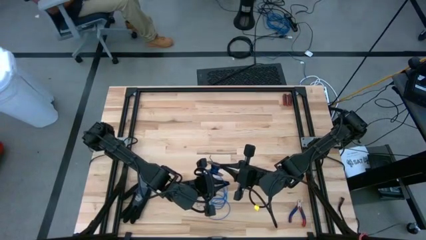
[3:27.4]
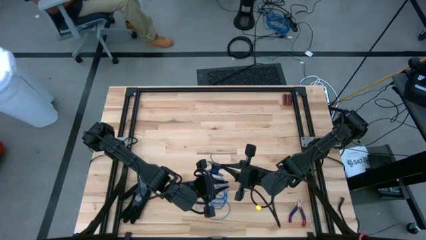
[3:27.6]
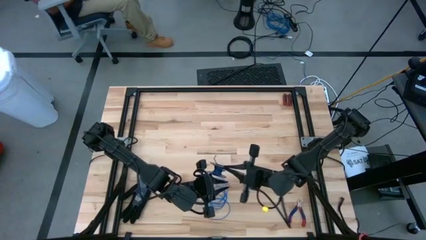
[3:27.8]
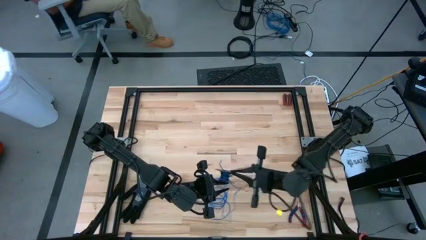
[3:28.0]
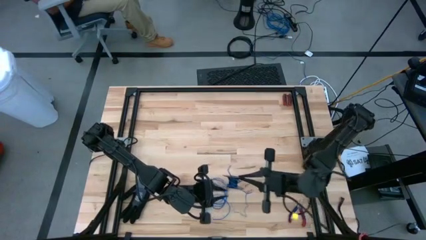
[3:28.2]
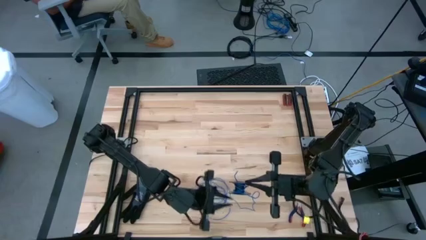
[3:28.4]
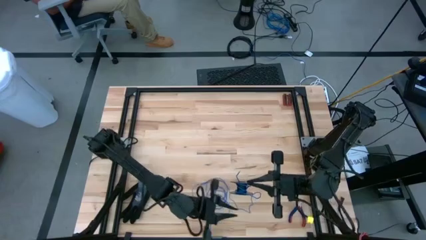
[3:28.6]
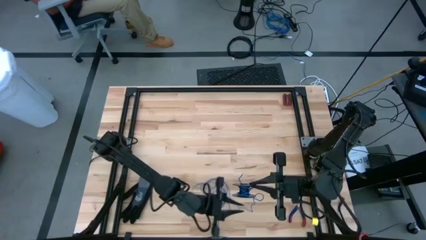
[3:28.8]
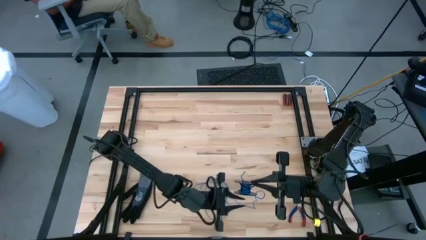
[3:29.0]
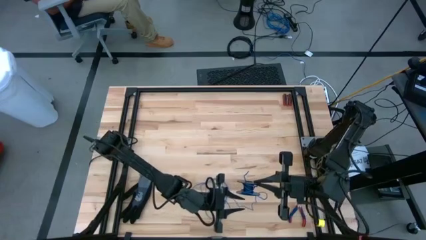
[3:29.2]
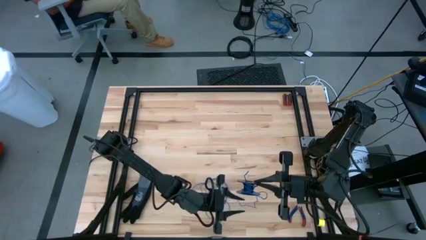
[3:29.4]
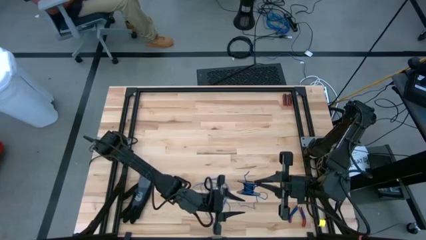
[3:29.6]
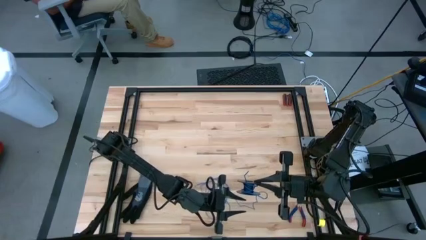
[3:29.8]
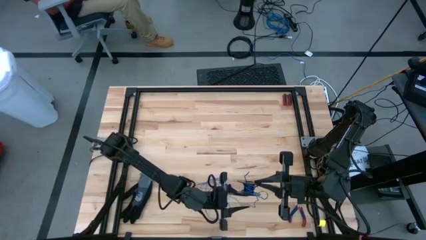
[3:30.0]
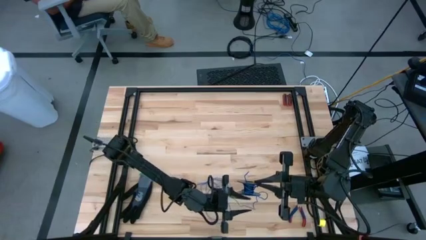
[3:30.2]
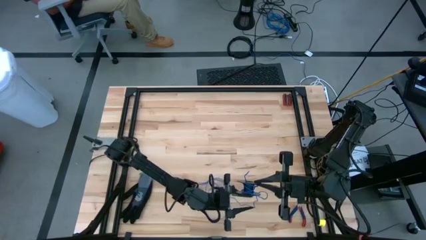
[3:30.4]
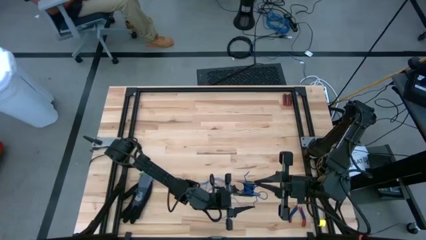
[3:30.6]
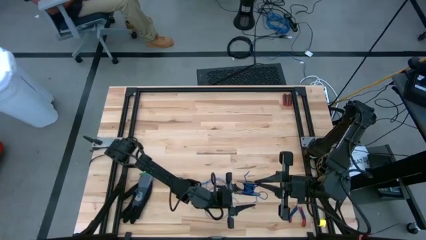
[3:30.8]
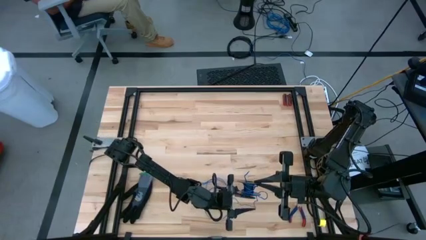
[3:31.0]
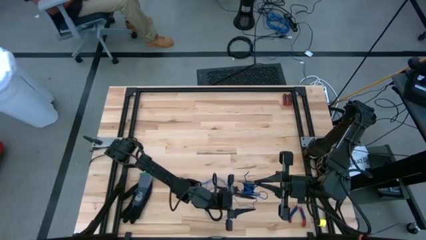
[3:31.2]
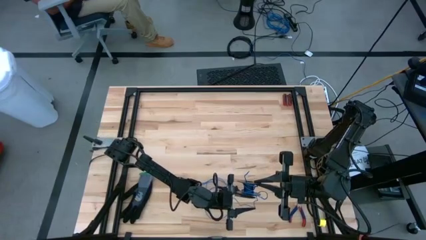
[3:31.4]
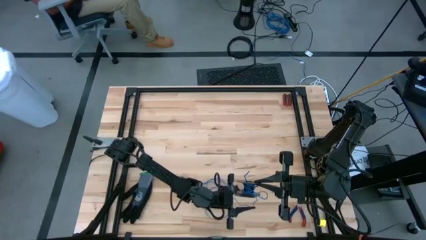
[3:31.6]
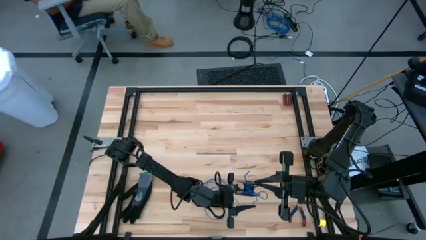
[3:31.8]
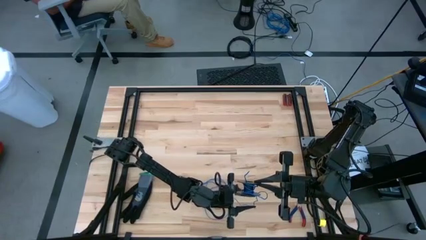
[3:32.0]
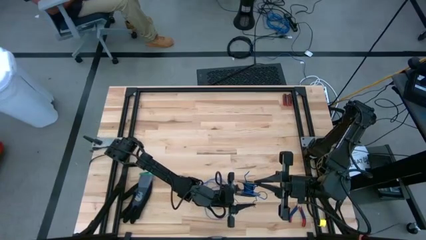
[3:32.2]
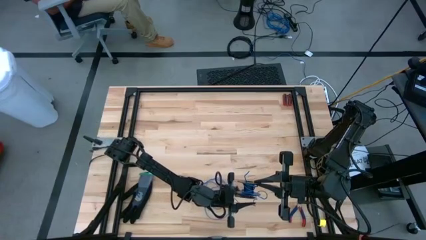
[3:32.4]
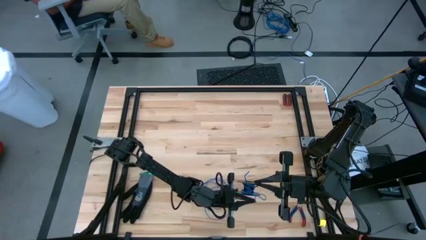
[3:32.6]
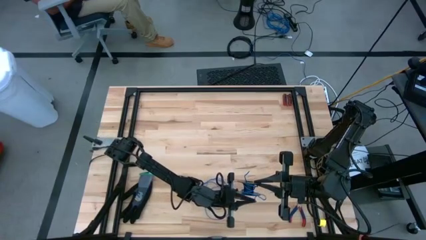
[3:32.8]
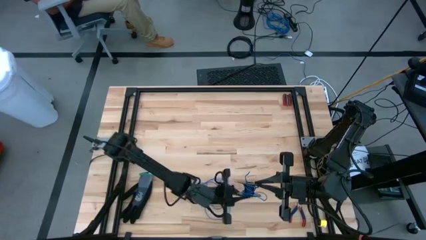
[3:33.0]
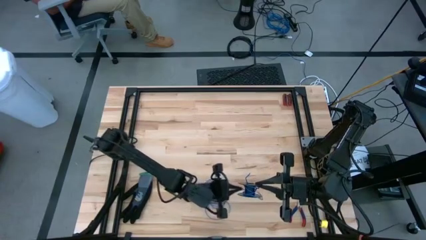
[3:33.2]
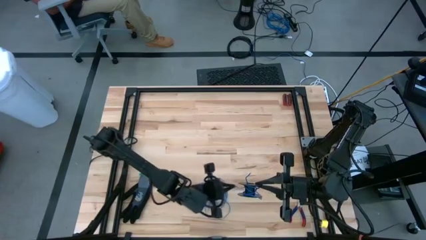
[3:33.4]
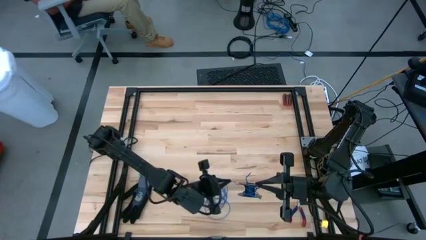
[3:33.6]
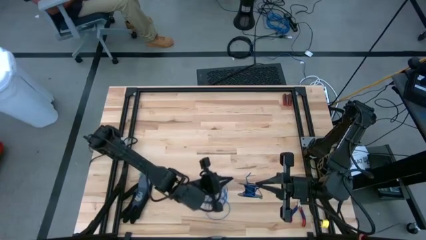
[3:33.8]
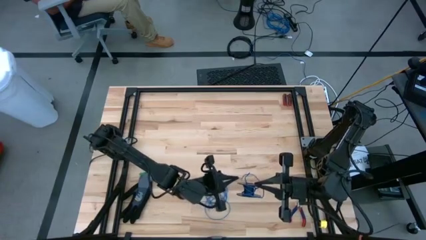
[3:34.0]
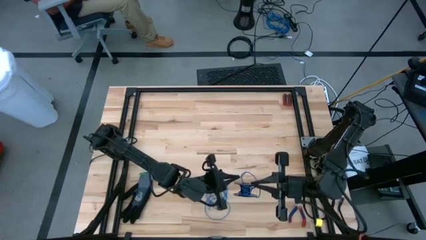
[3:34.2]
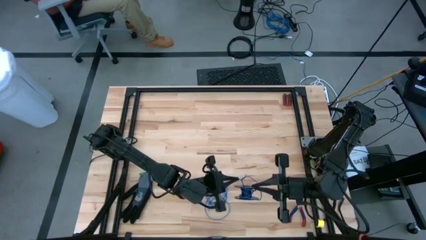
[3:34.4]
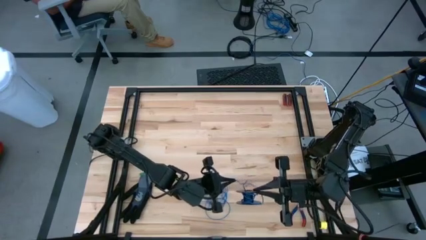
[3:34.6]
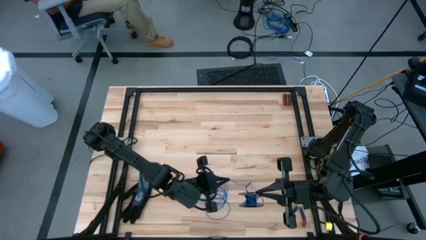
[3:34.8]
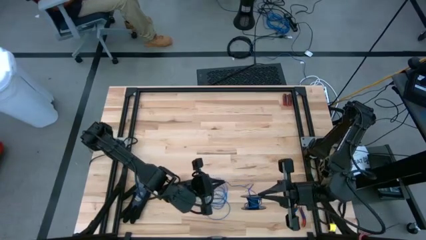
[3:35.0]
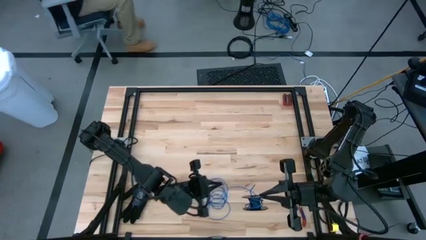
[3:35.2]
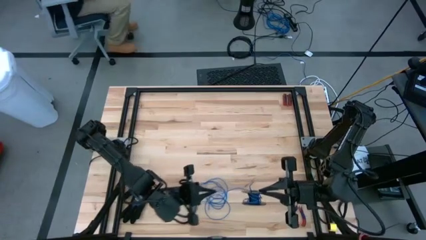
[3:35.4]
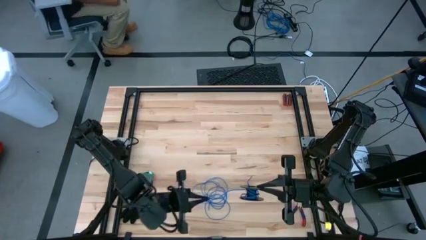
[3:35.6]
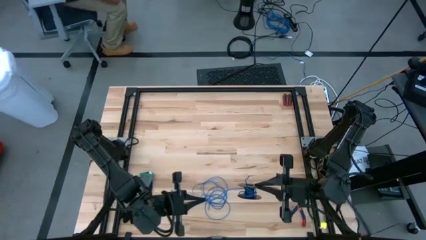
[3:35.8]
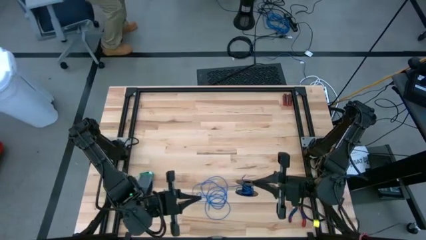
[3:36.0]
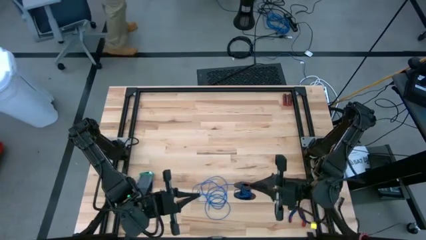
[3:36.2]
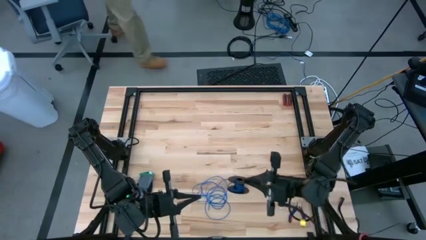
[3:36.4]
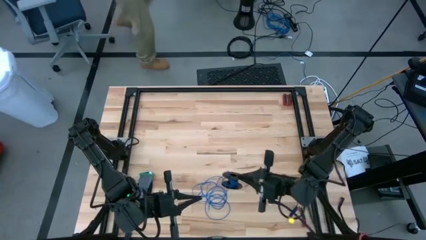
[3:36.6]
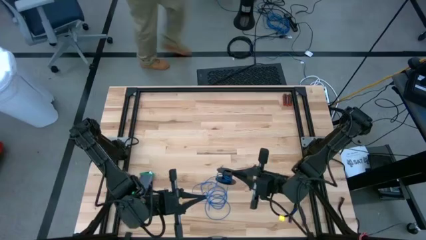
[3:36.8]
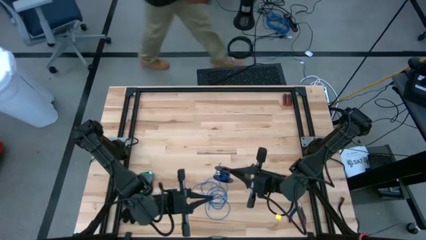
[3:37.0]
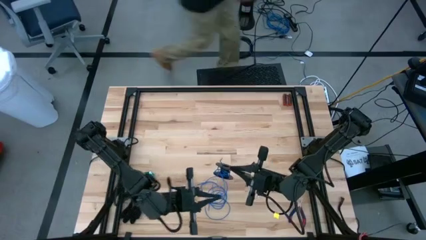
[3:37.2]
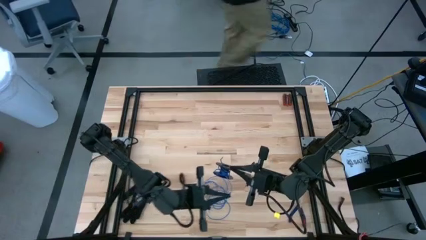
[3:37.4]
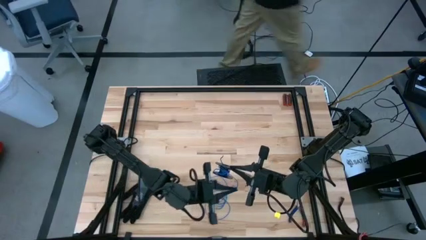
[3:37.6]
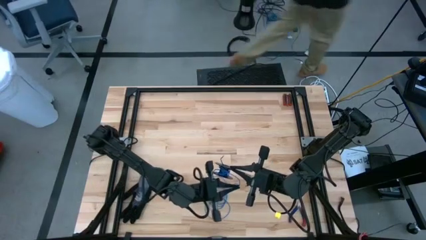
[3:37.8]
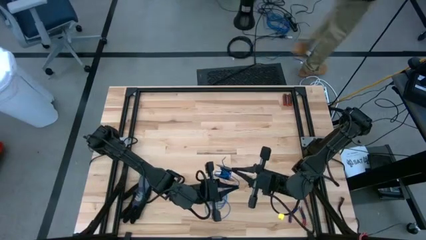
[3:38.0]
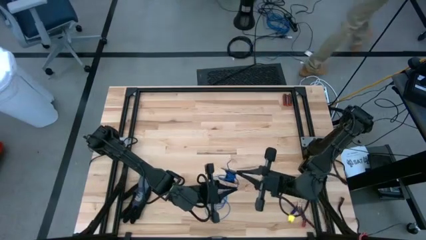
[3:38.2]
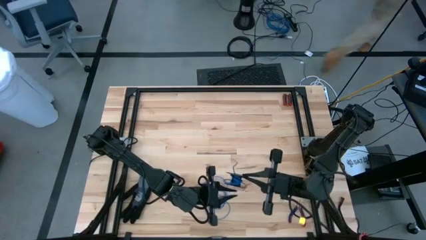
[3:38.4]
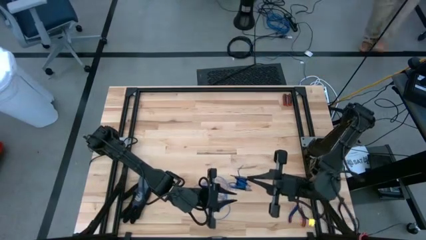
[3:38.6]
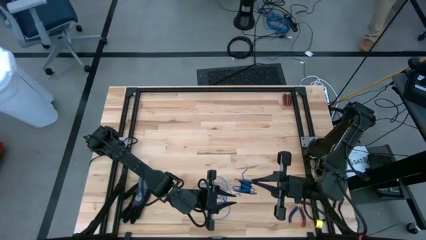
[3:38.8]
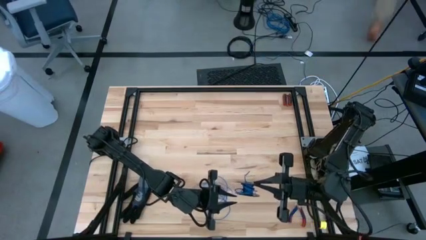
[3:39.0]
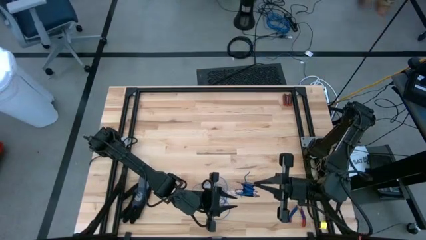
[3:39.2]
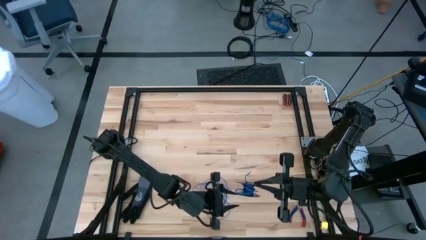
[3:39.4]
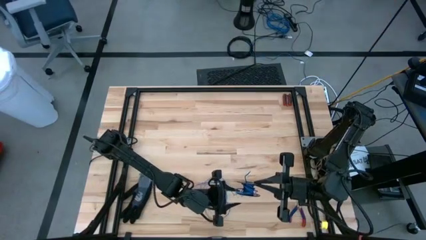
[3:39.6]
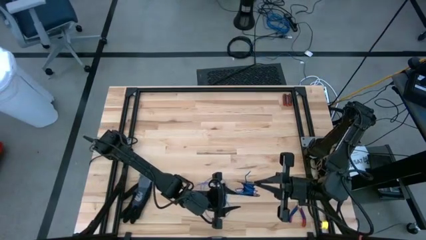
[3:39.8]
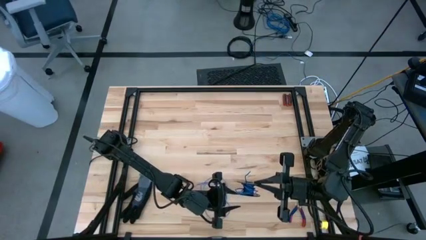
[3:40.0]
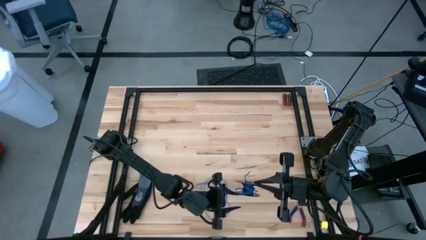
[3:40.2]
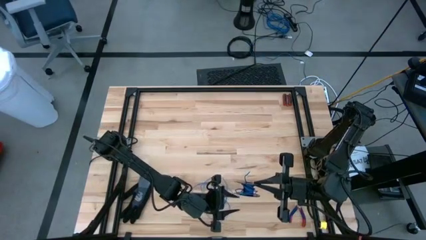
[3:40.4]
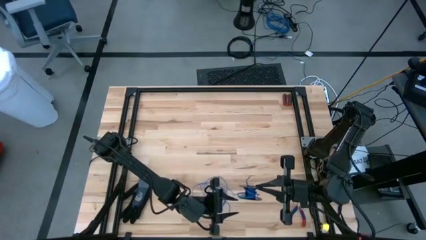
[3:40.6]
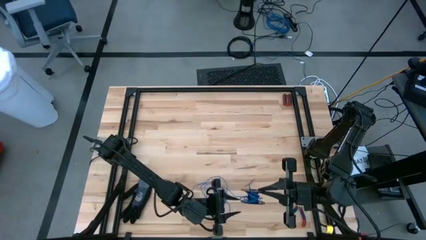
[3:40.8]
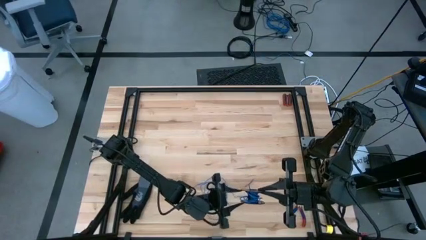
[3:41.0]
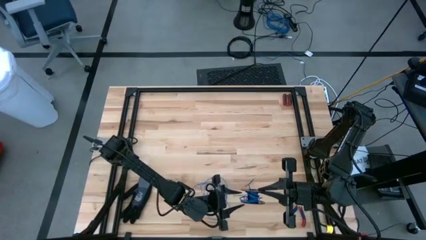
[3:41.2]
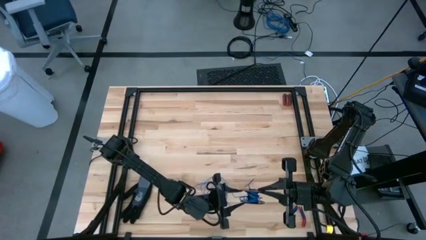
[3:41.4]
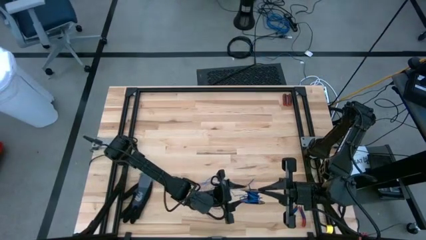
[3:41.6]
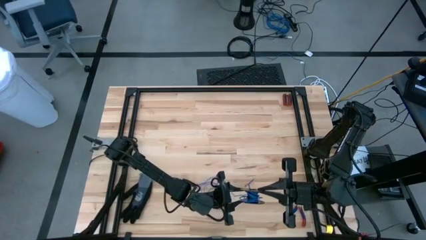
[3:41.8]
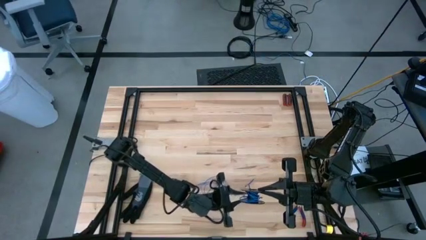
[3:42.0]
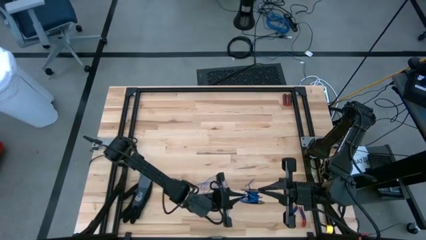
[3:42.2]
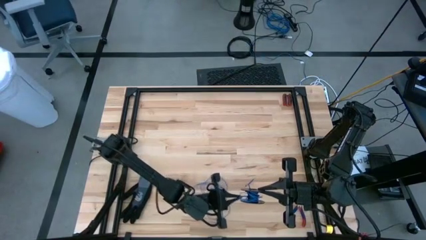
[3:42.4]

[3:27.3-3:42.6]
Task: Coil cords
Coil the blue wire onto the spool

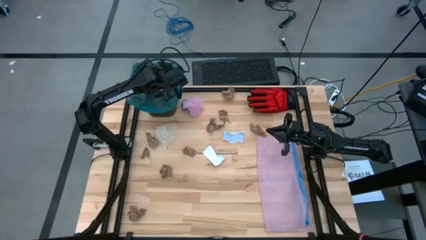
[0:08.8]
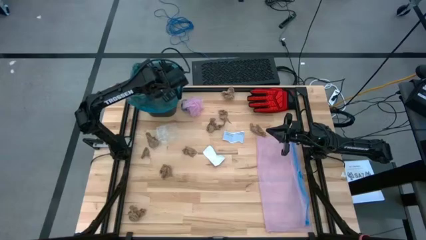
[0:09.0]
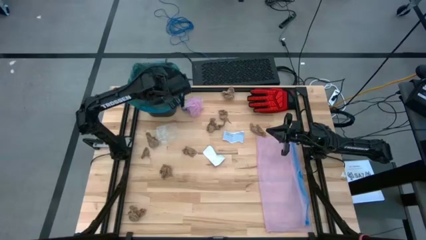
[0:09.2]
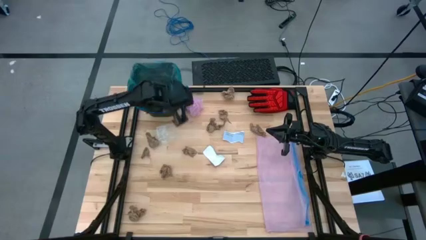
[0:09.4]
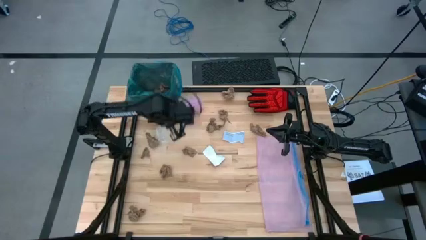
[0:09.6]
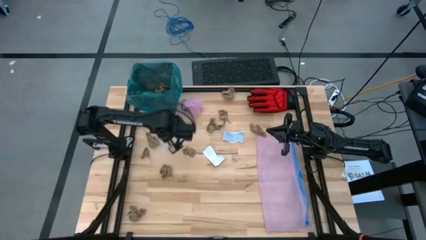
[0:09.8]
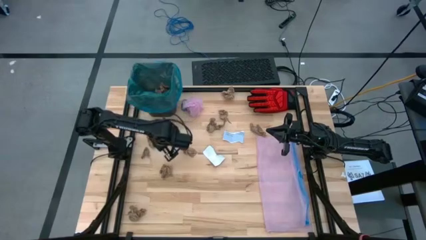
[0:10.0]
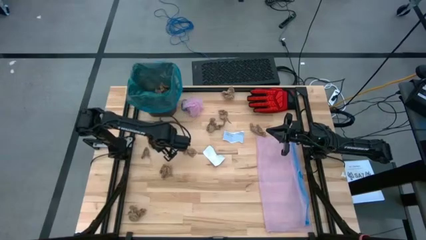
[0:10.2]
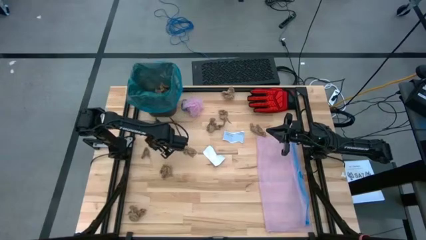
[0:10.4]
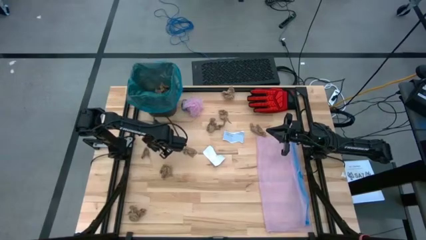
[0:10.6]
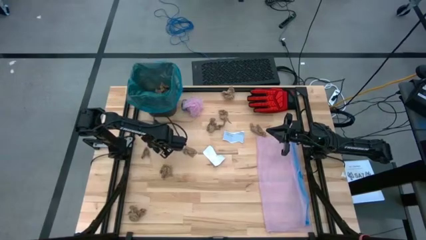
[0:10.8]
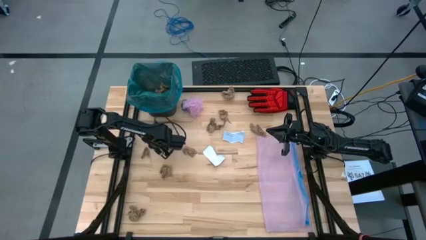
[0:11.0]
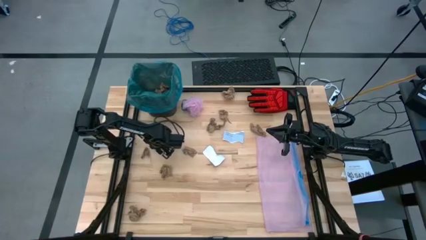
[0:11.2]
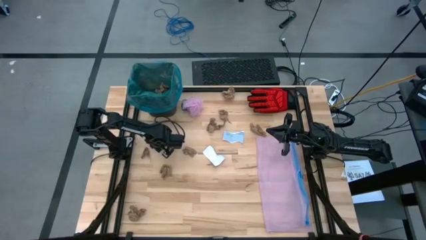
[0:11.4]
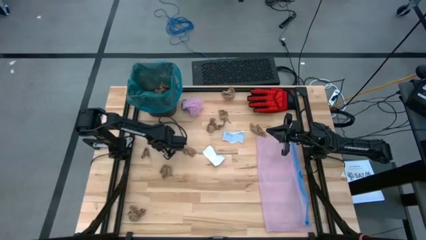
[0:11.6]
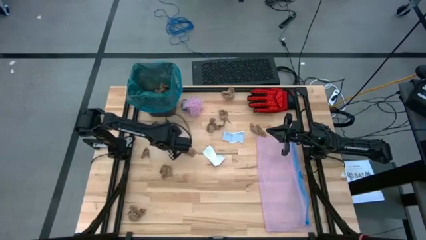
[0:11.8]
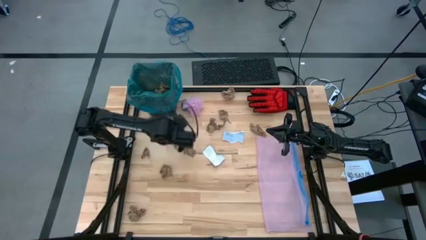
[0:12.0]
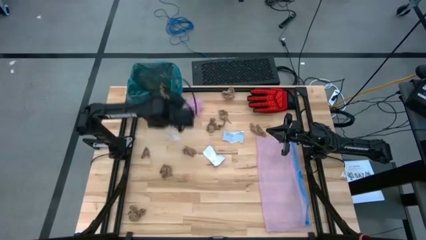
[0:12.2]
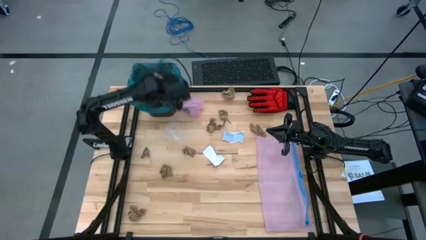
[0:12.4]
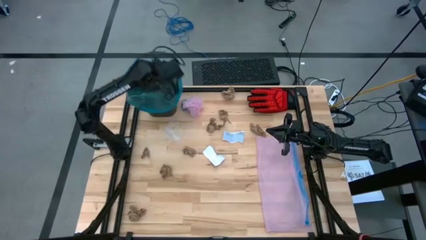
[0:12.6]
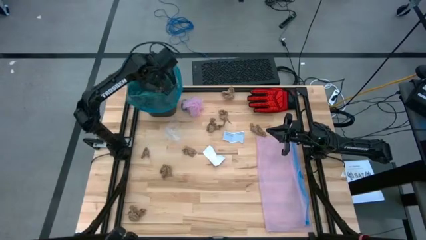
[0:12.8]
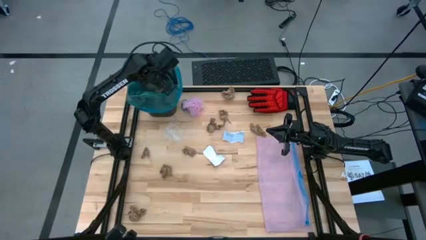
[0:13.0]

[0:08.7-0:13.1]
Task: place trash/remove bag and relplace
Put the brown napkin into the trash bin
